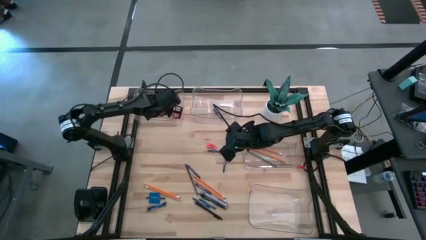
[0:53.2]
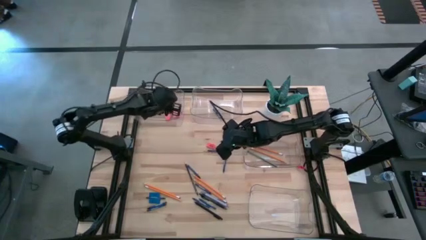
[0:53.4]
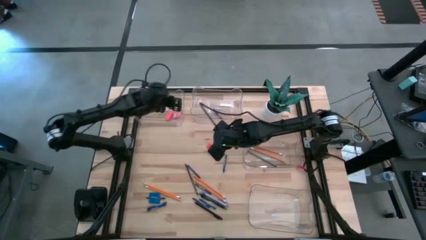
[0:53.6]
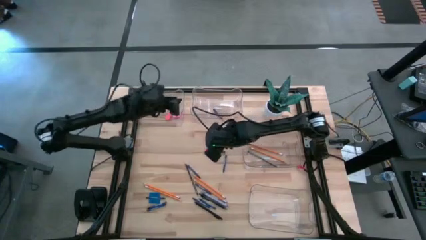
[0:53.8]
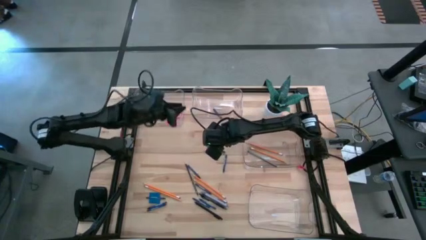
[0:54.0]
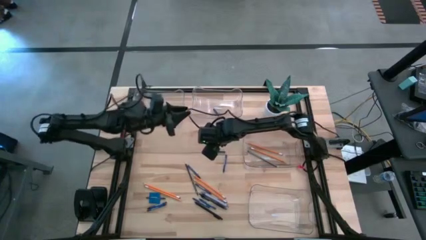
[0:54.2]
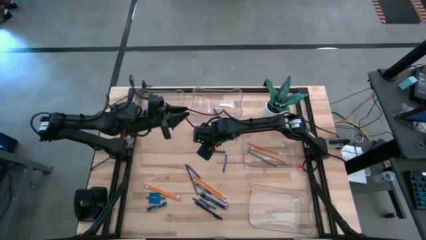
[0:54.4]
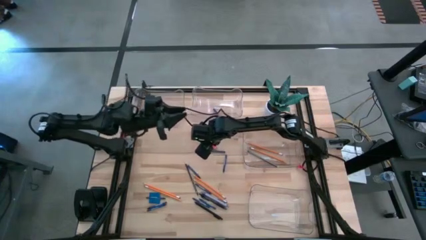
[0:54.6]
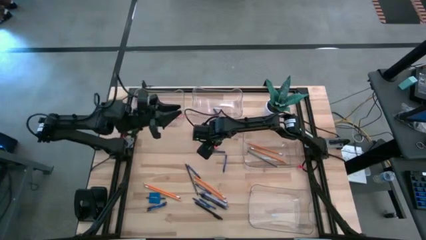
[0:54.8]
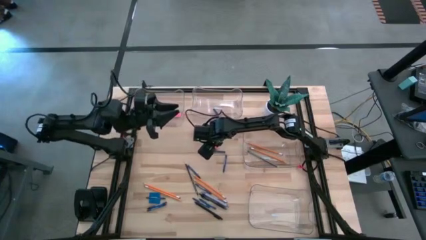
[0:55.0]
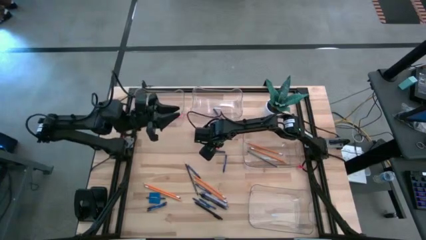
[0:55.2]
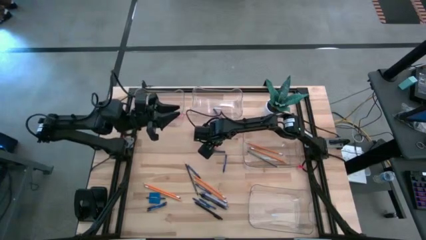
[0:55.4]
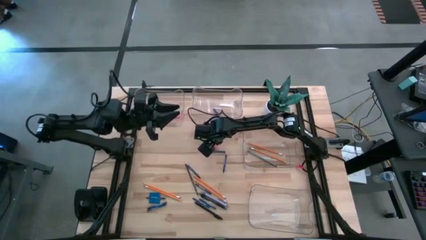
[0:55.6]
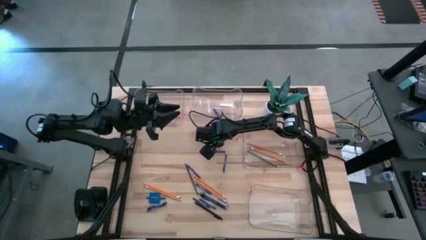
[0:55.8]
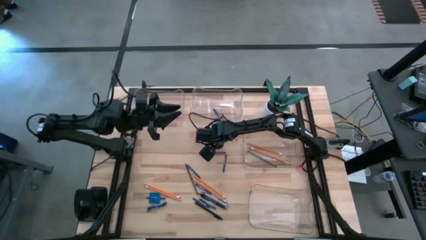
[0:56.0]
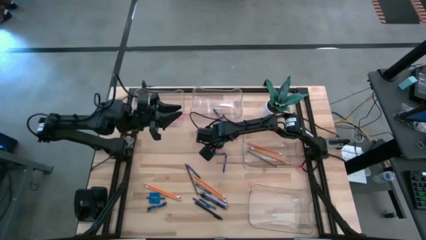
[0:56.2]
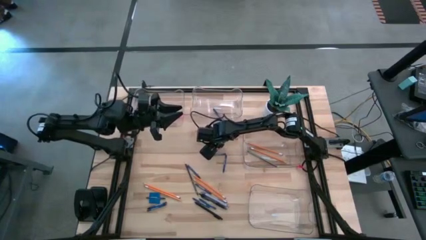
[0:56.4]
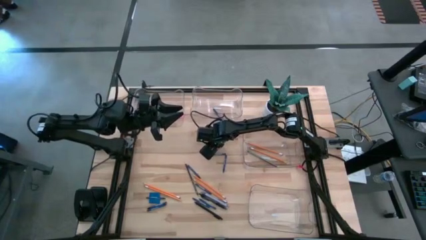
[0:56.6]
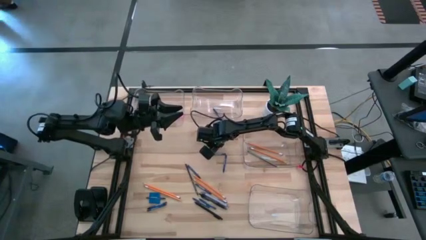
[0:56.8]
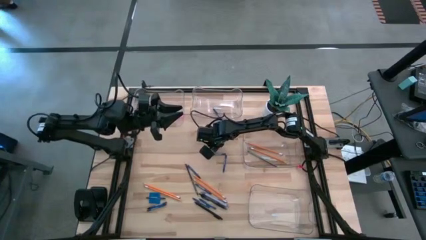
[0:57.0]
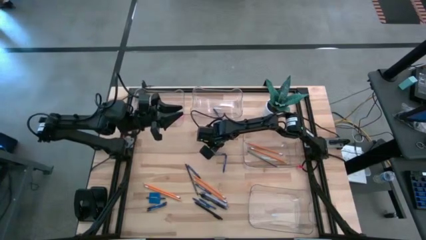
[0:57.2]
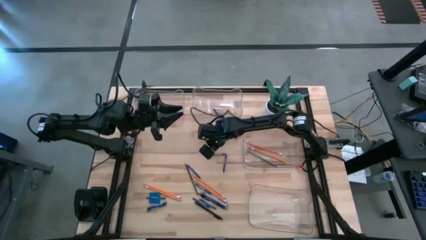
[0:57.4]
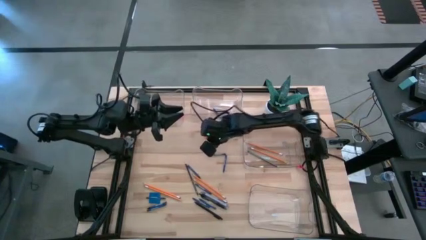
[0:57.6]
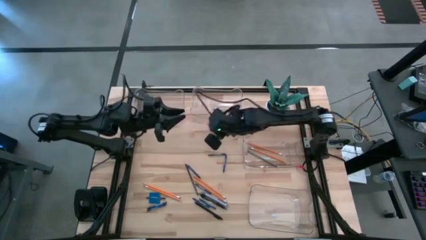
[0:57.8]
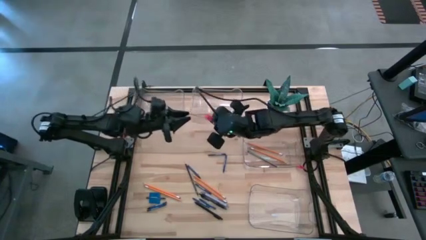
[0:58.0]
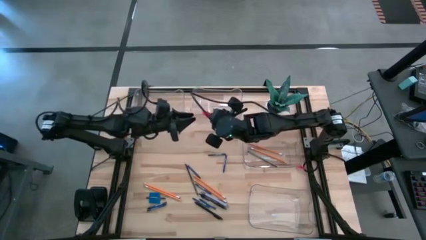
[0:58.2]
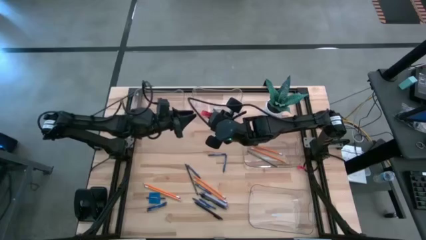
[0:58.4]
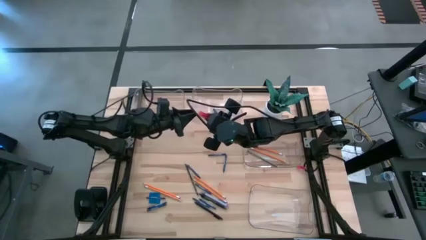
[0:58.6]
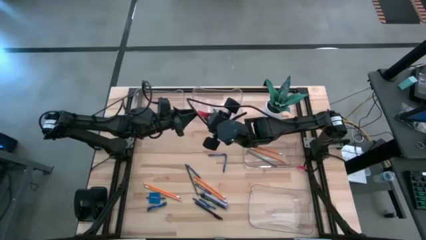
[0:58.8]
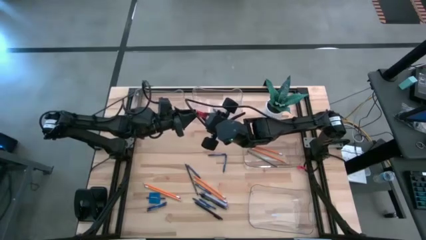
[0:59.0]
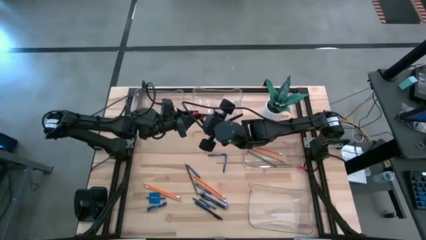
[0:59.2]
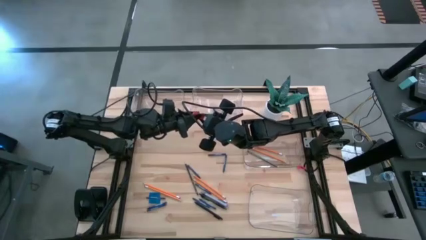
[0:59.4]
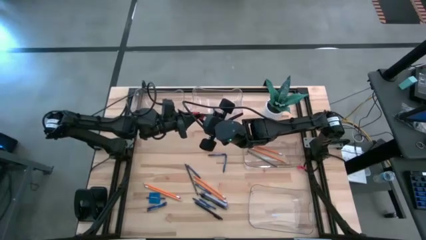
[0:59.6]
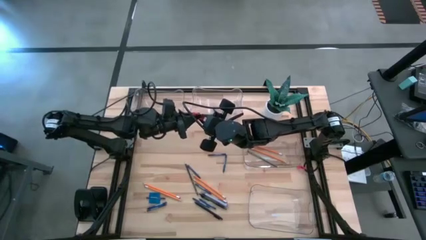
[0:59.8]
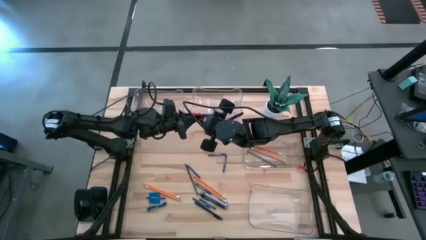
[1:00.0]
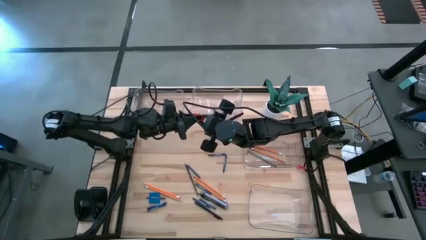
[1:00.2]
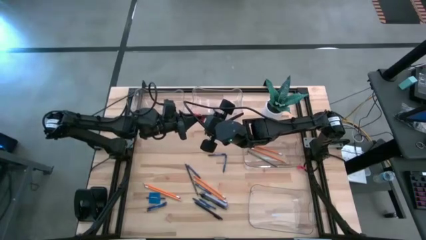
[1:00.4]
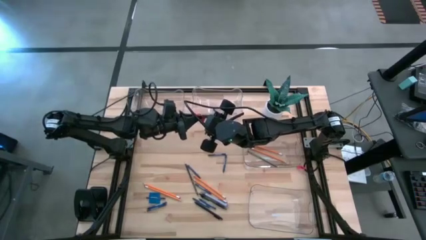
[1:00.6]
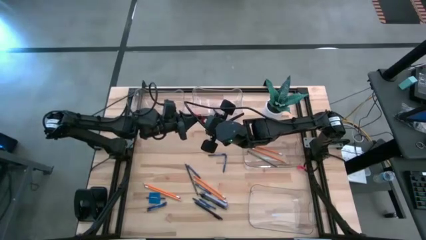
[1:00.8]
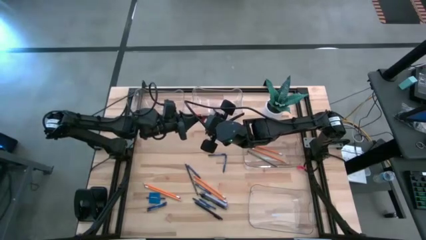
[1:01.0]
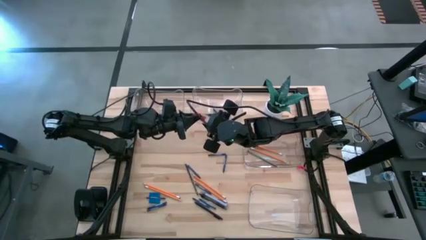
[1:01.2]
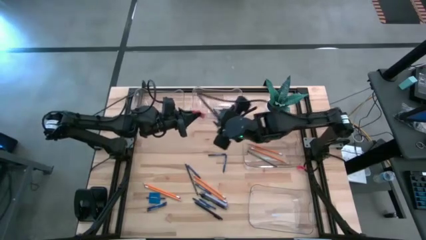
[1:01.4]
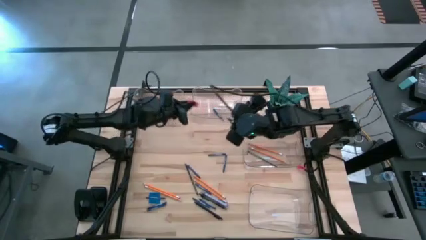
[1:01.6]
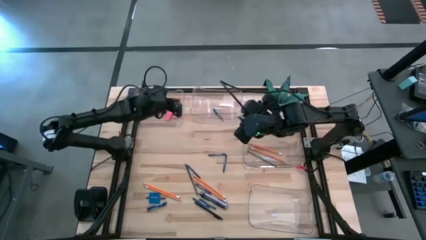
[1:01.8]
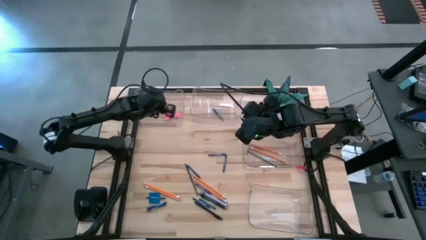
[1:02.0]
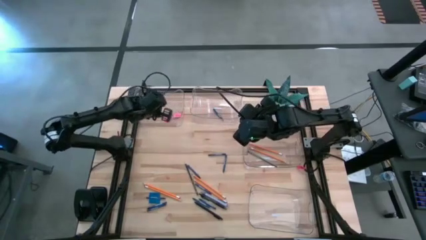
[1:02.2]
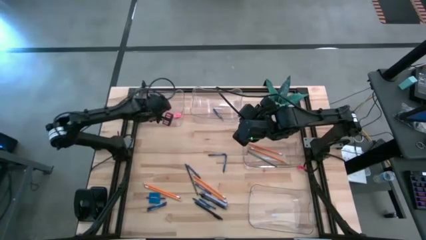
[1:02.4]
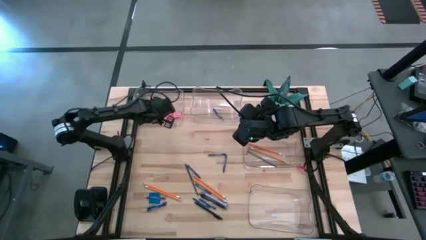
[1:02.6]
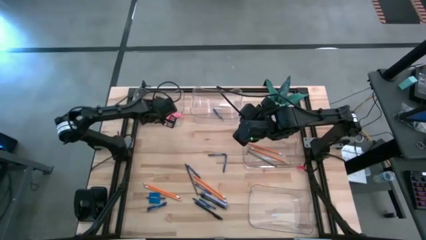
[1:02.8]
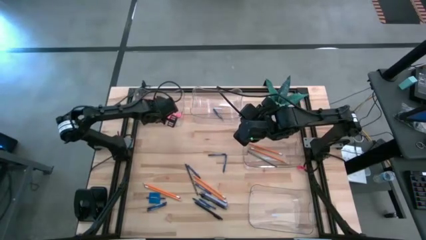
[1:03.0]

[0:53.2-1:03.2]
Task: Sort crayons/erasers/pens/pencils in bins
Put the orange eraser into the top left transparent bin
